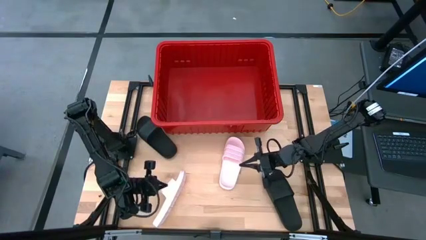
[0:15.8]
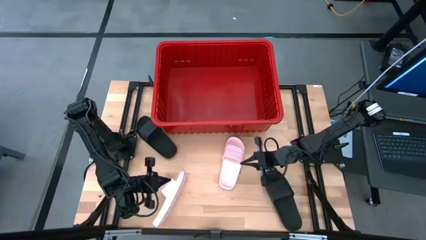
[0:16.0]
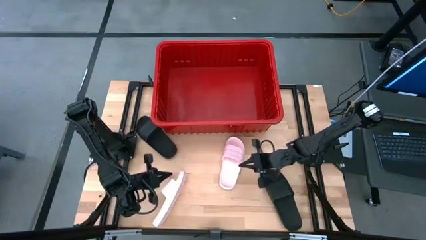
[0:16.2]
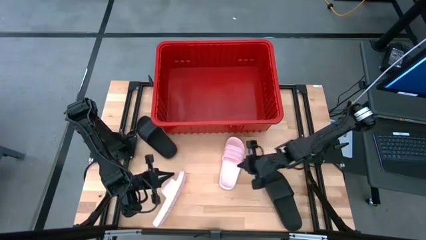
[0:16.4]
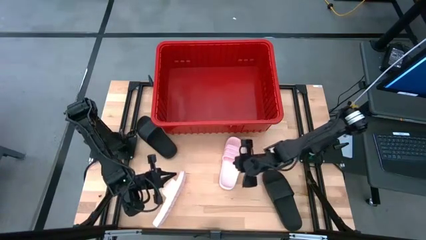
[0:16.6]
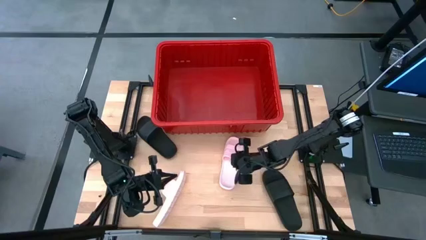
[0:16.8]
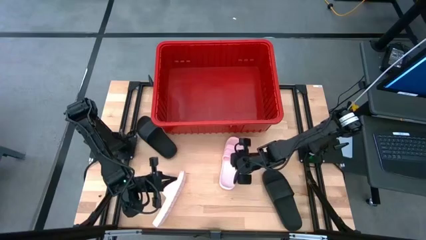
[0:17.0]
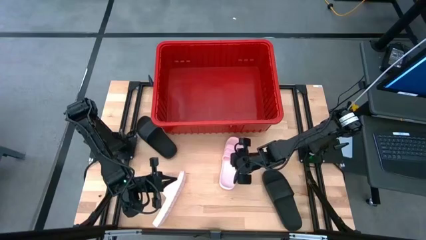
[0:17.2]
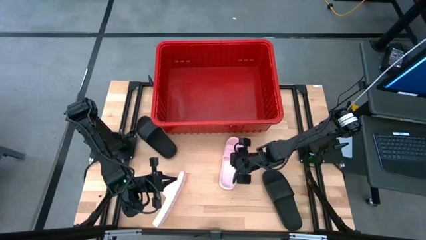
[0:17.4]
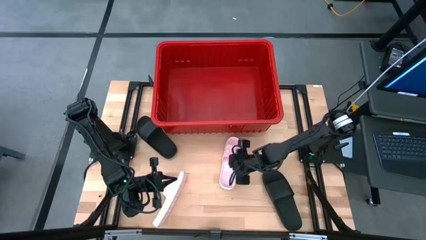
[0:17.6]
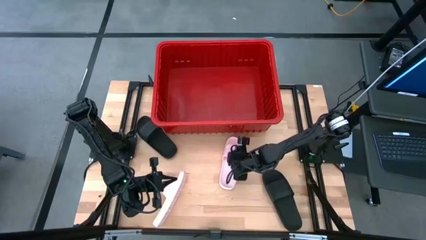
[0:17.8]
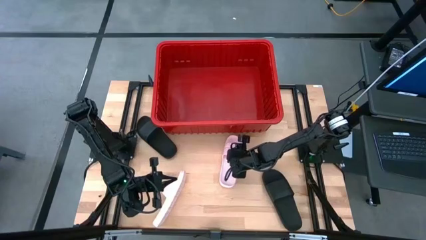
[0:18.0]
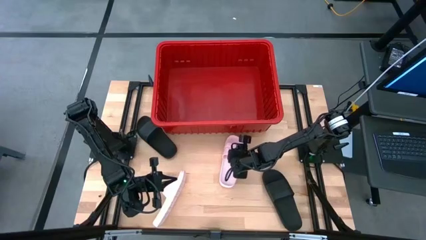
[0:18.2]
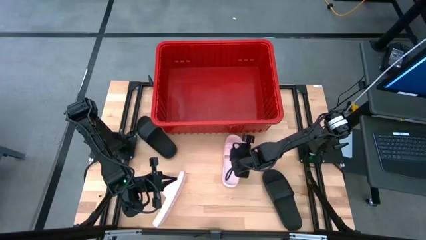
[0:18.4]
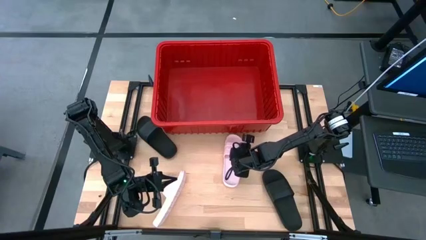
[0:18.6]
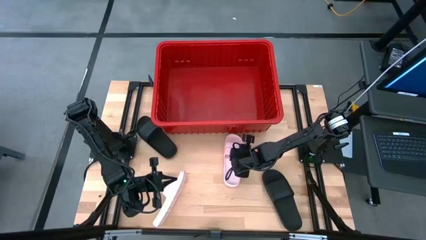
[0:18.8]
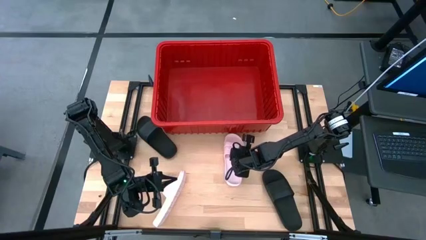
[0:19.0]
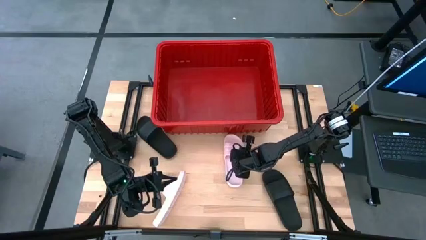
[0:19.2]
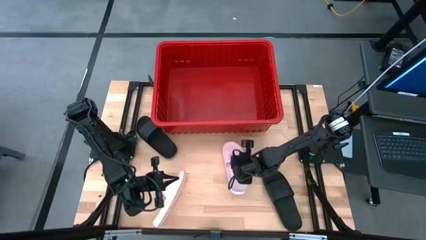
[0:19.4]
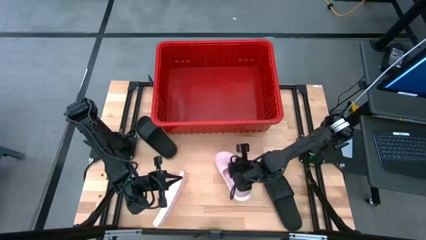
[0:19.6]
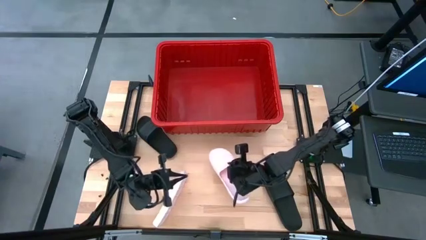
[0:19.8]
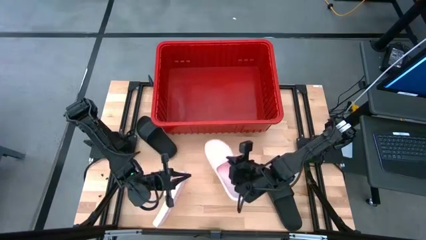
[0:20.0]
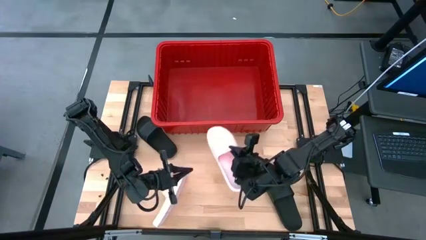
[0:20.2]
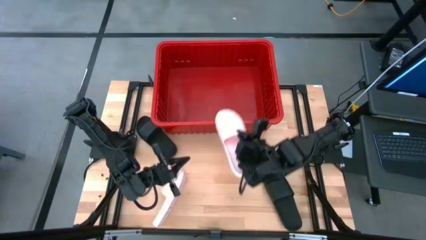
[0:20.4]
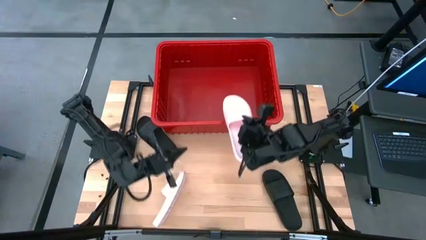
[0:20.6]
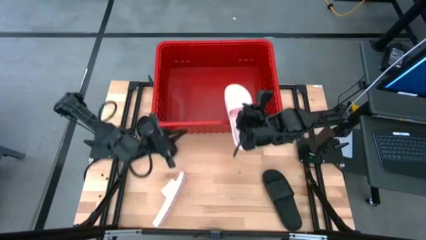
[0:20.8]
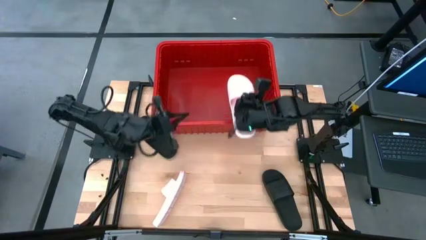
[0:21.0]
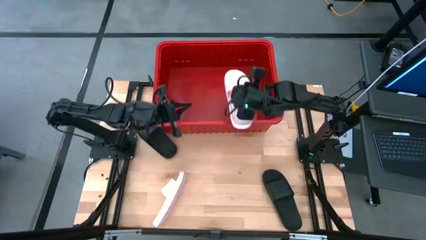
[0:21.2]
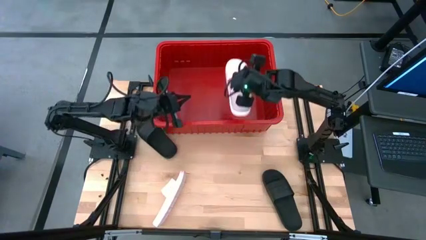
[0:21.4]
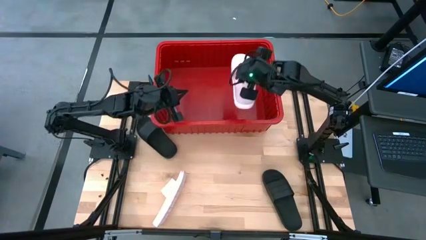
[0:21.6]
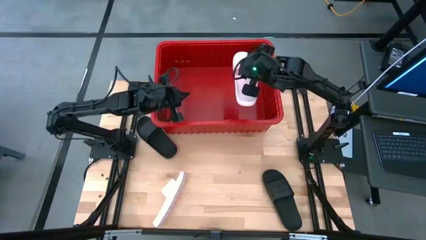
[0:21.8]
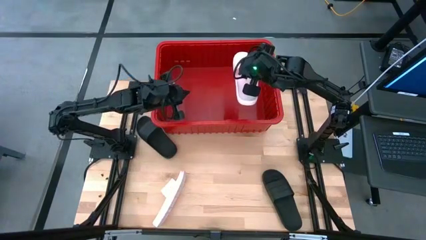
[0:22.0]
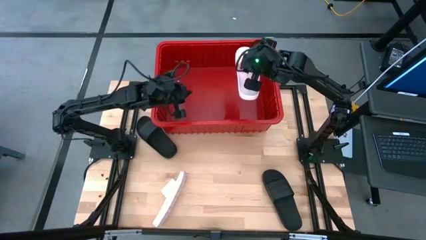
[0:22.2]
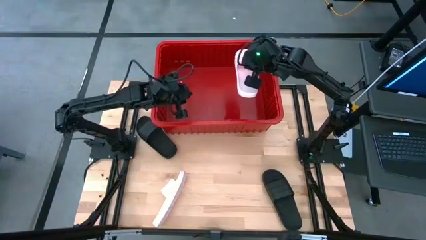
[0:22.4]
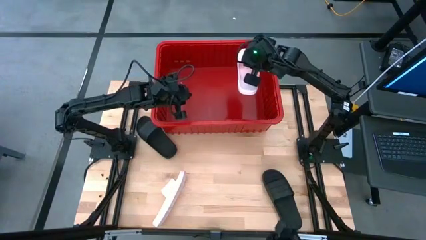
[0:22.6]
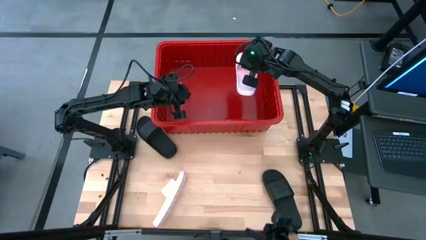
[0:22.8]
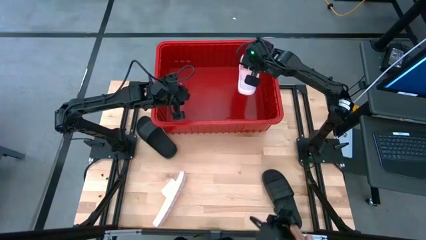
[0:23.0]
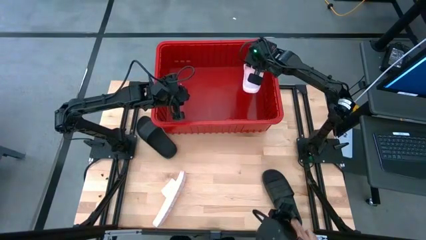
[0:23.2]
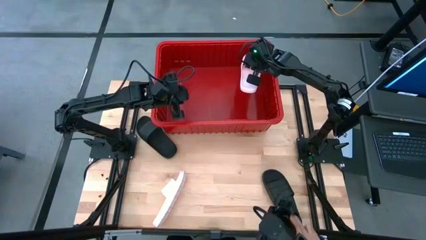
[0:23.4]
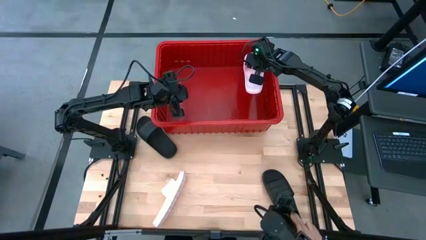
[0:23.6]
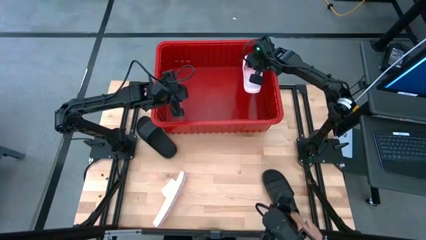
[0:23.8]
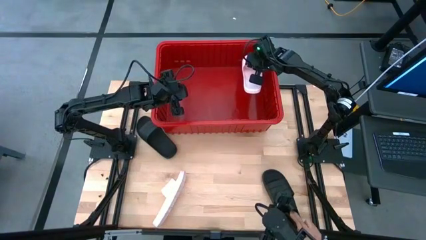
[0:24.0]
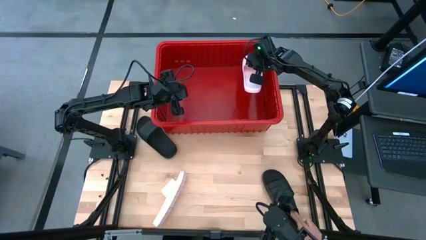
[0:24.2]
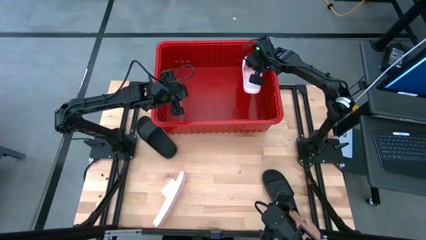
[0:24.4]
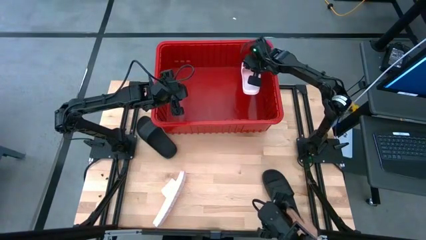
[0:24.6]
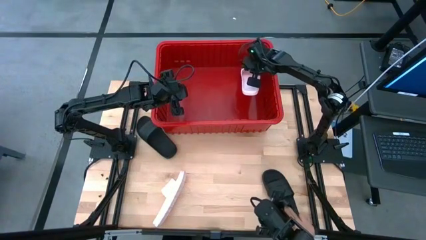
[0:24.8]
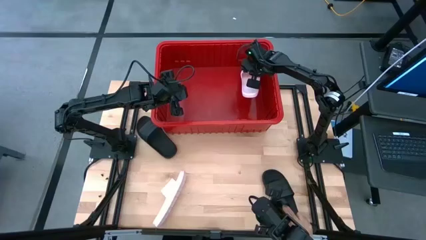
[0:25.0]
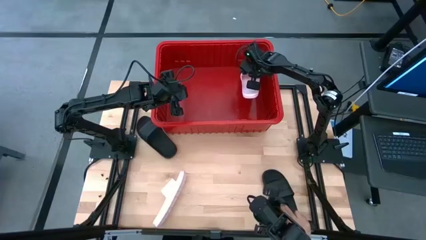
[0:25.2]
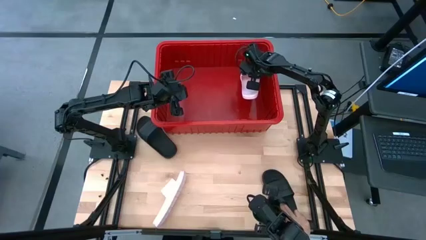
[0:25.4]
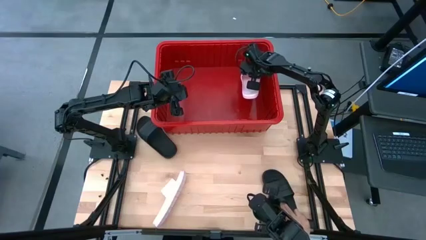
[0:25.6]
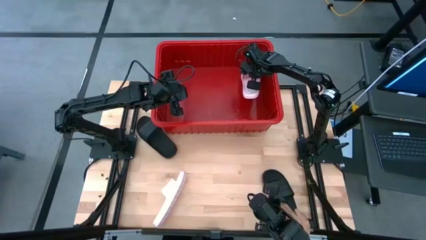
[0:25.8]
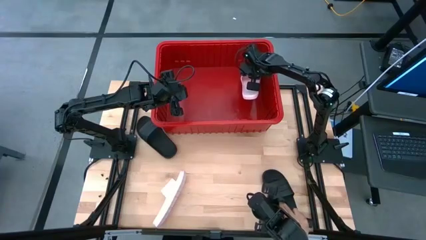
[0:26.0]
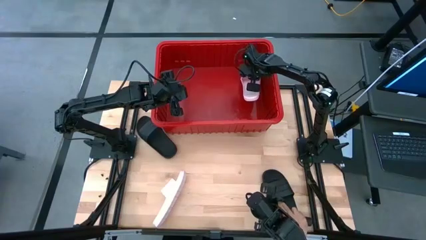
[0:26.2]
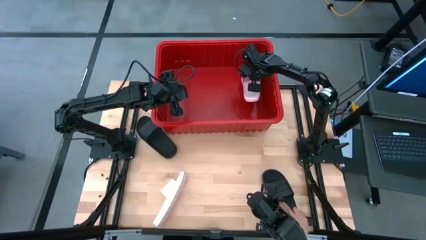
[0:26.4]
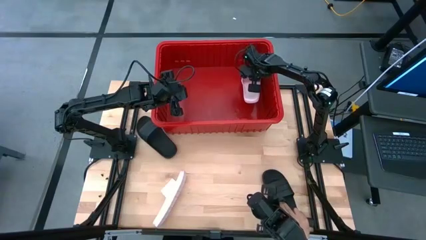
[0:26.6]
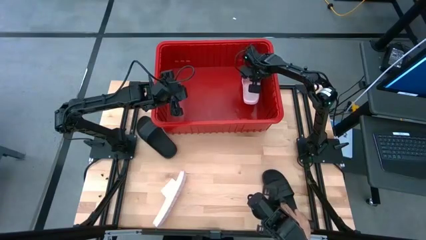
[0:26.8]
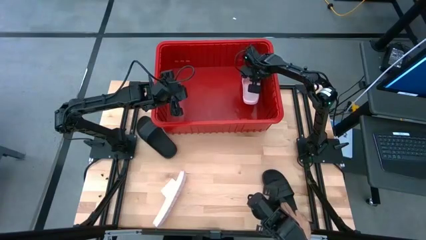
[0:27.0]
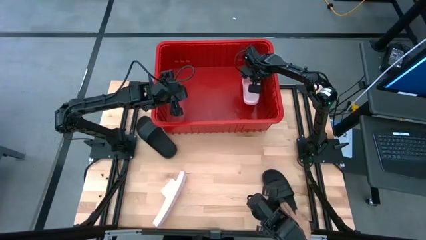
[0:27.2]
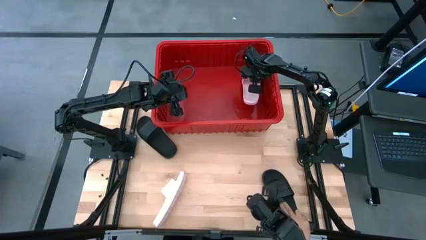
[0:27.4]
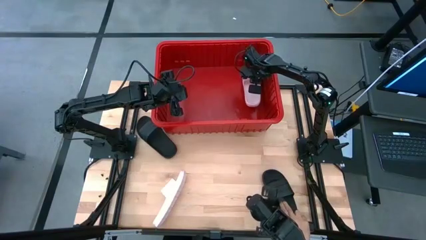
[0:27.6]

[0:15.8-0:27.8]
Task: Pick and place slides into bin
Put the top pink slide into the red bin
